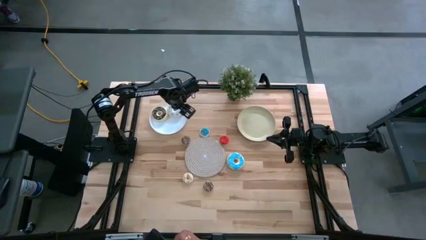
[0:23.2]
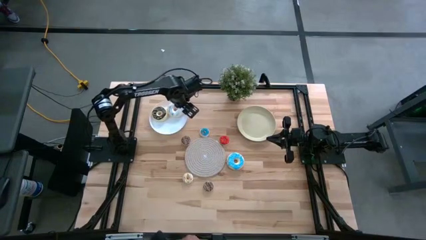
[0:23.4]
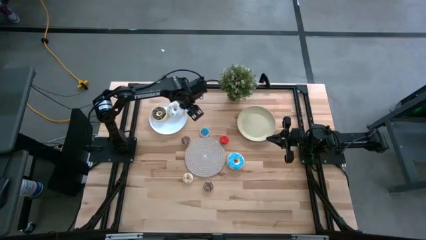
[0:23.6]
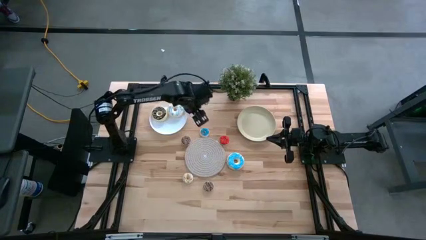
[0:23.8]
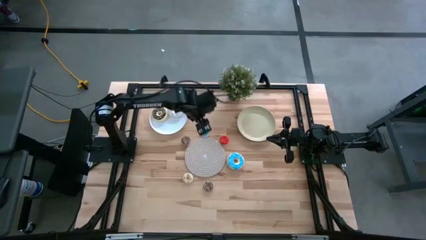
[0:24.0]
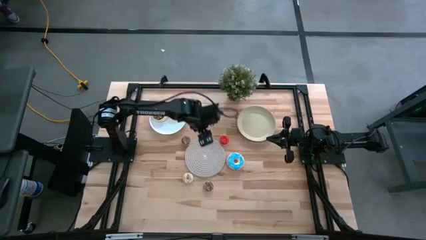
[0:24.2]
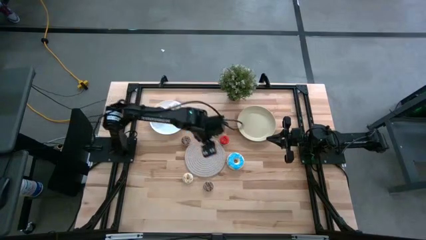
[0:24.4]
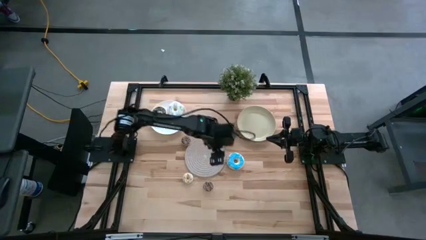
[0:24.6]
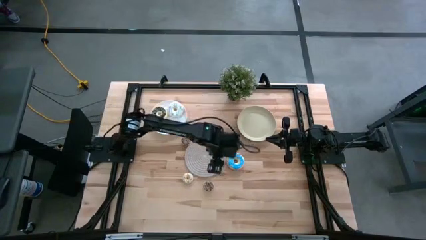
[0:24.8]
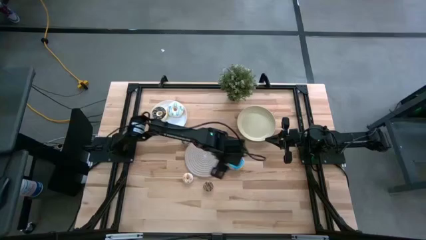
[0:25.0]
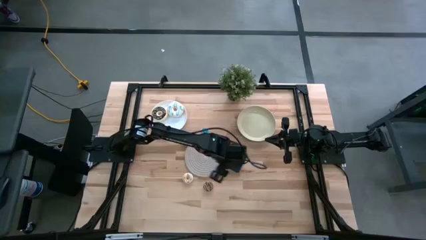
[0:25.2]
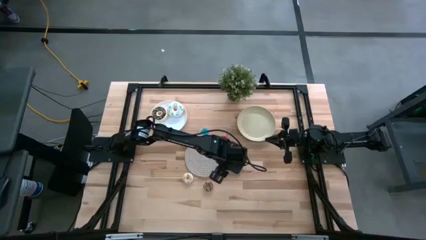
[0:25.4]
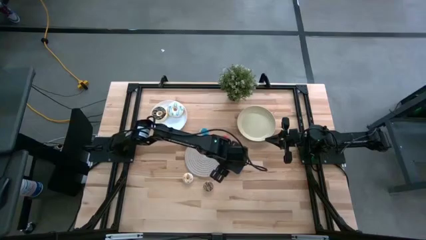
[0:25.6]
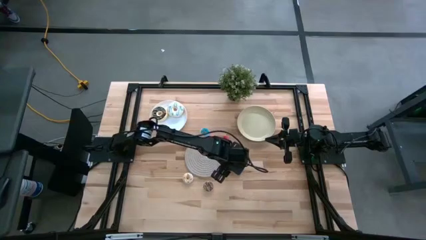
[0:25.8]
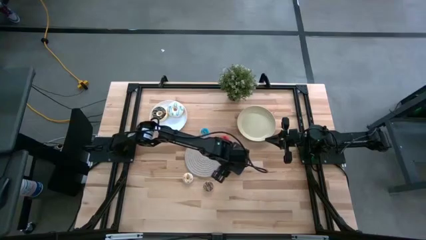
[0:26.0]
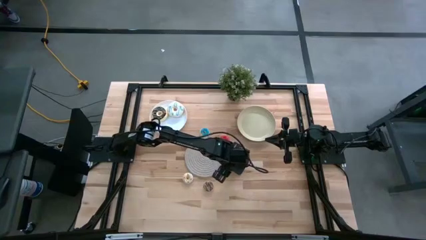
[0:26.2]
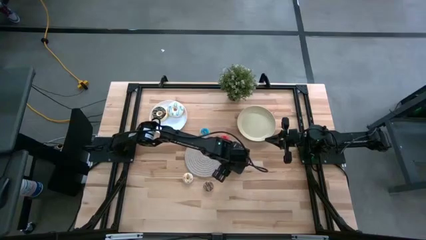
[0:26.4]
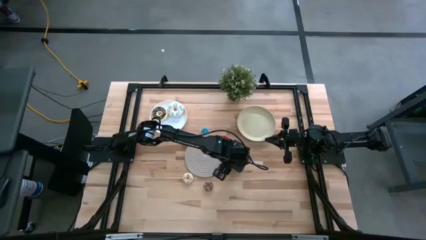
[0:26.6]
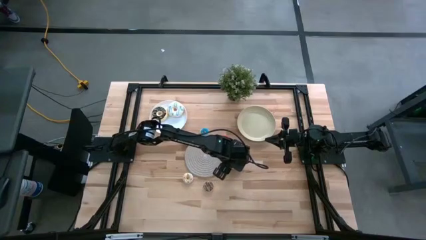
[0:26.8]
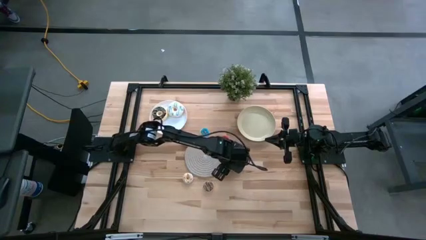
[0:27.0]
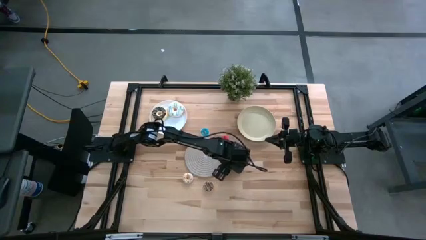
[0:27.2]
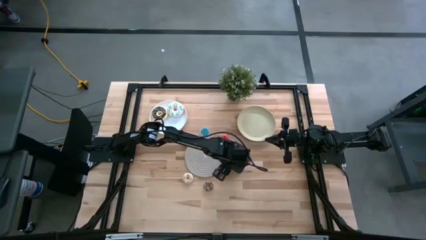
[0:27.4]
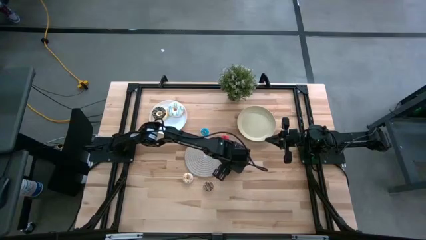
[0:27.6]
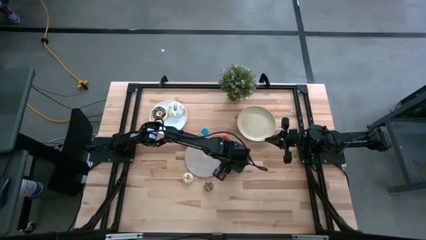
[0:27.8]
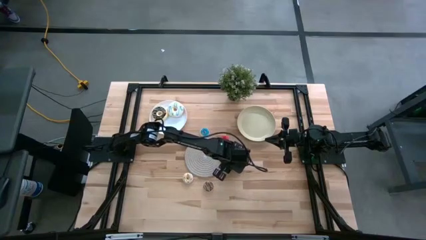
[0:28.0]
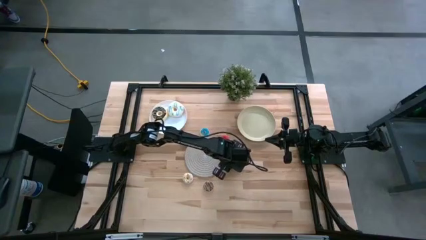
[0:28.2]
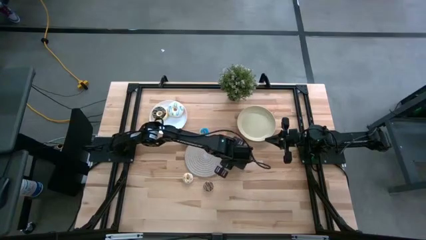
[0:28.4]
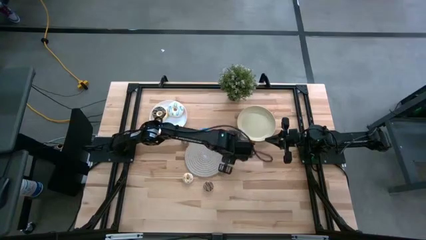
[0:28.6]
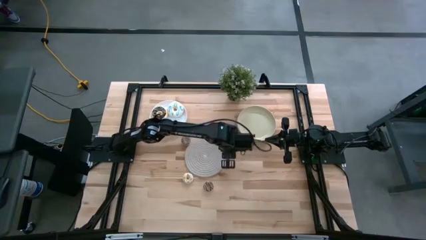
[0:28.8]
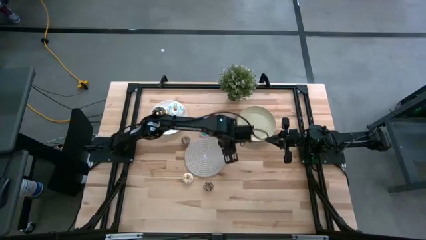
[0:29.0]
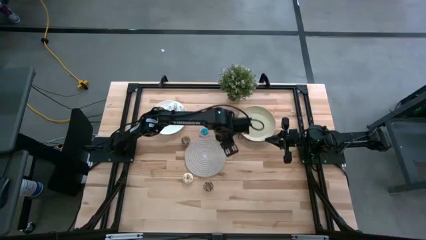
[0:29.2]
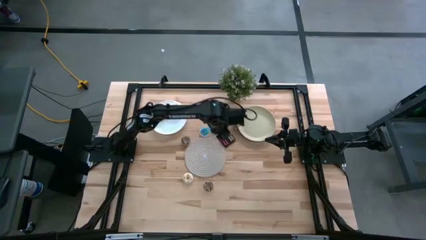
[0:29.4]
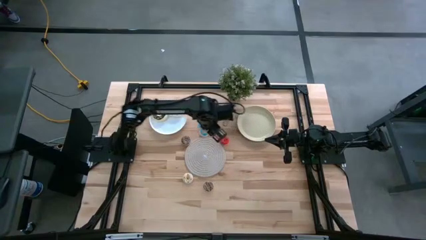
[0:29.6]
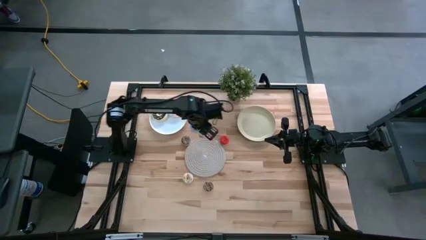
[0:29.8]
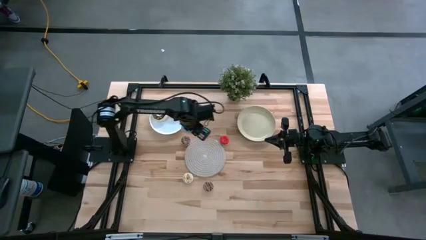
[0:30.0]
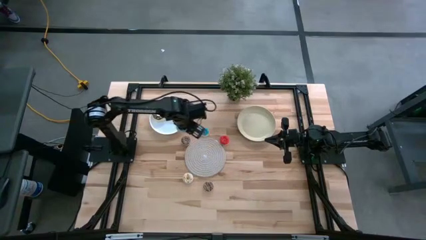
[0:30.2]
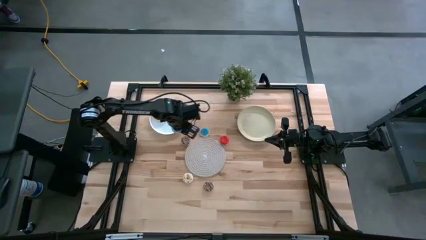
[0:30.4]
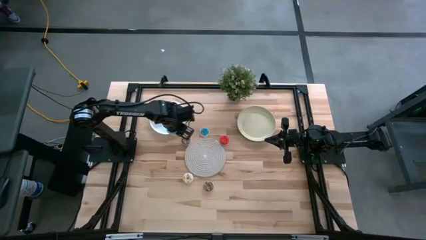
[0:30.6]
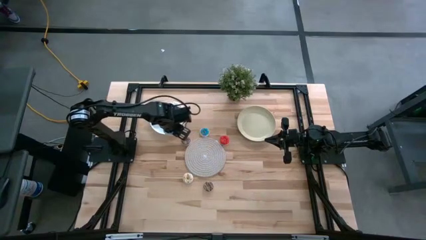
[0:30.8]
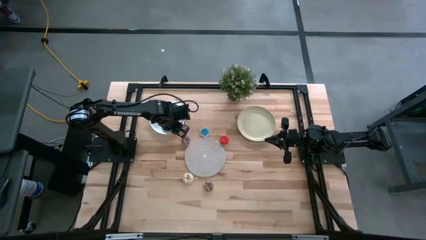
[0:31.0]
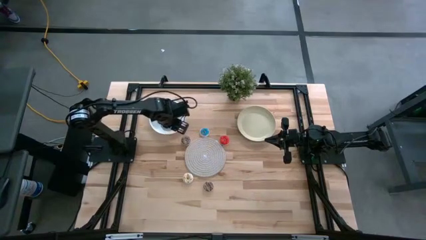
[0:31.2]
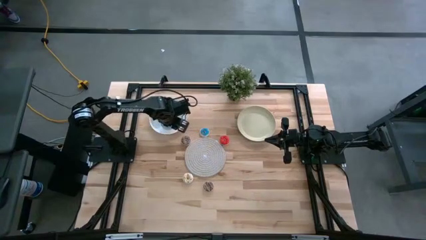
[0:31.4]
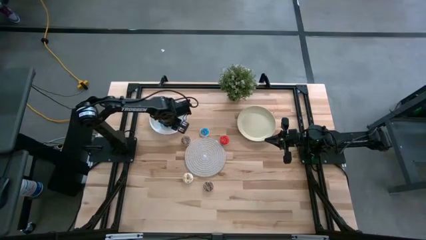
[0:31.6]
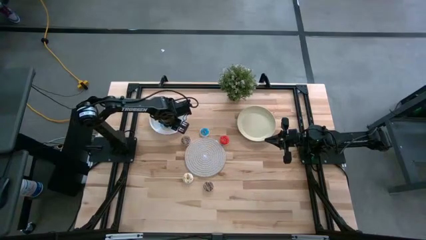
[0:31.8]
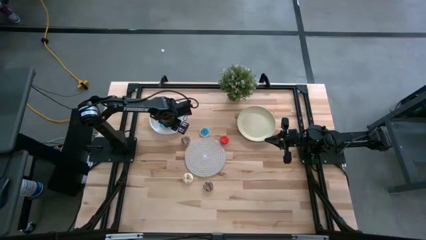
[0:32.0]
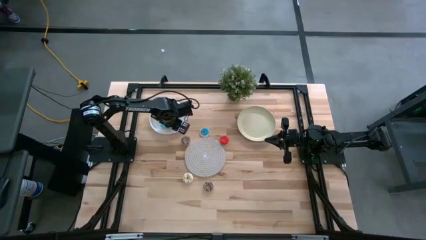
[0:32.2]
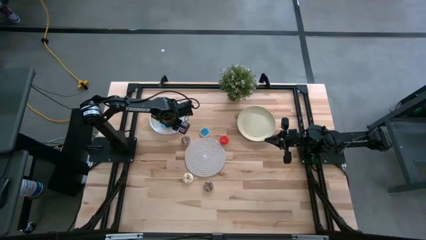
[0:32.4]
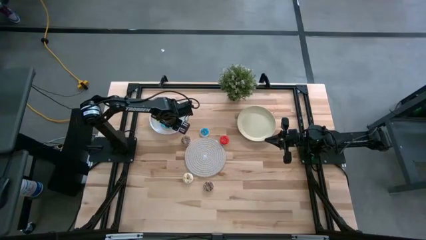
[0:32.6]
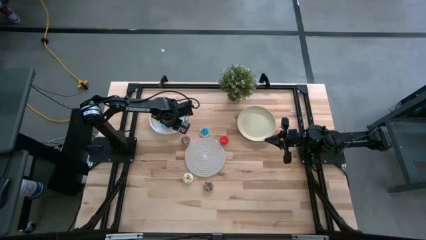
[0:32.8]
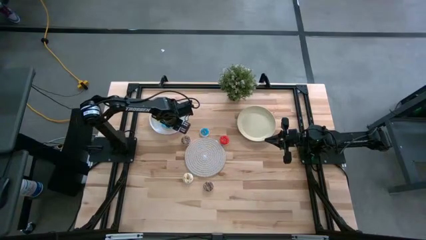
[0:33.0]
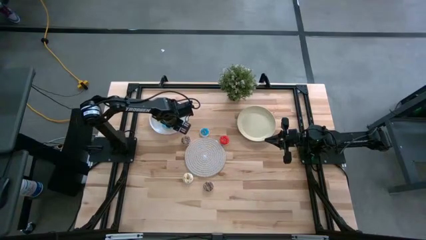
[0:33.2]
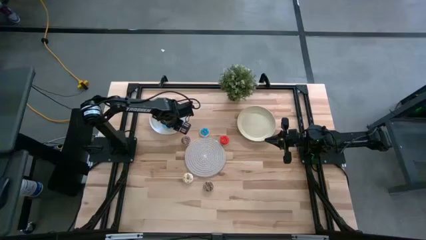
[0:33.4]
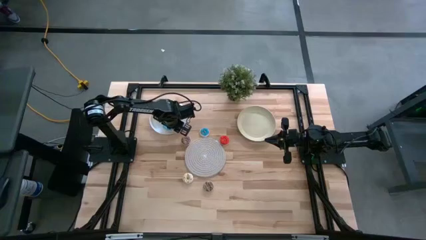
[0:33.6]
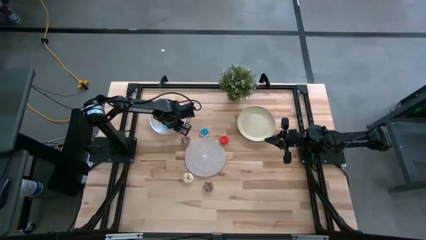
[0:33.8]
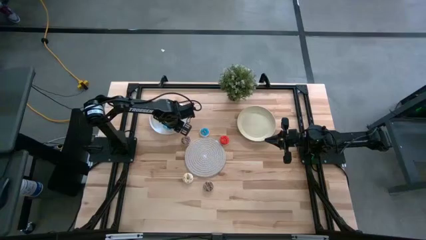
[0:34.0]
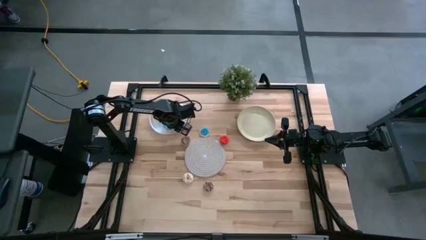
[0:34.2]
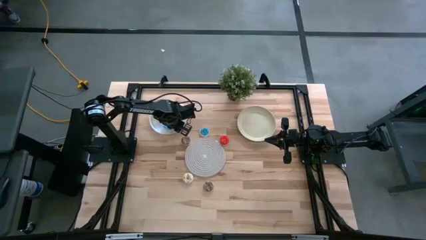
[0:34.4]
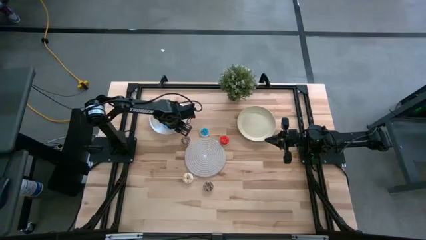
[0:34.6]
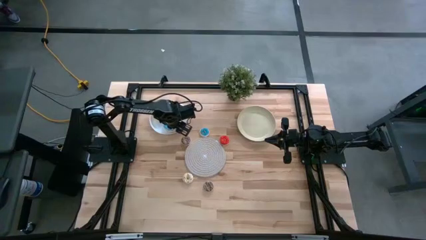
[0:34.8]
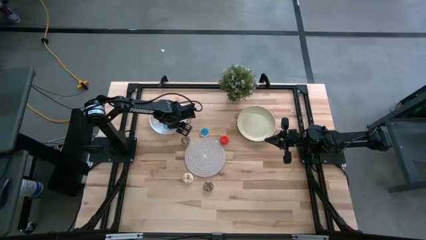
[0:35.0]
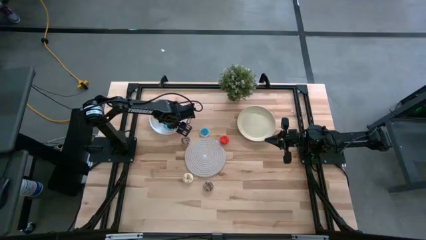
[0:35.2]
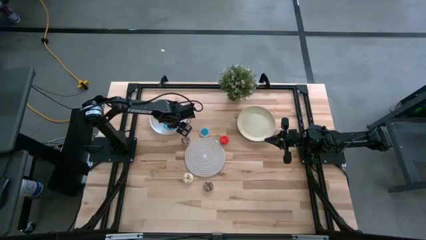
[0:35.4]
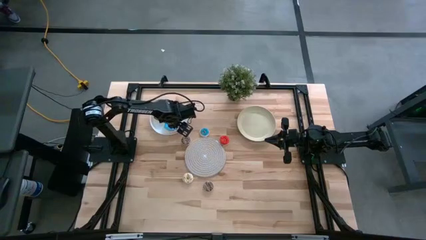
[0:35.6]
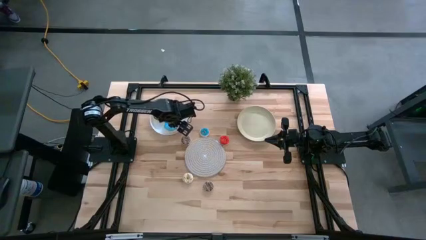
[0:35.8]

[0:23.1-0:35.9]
Task: Pick & Place donuts
Put the large blue donut on the white plate
